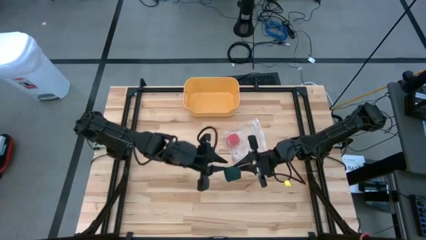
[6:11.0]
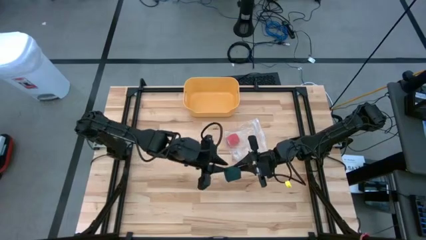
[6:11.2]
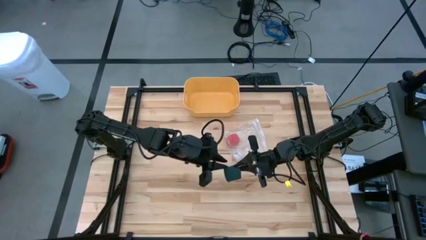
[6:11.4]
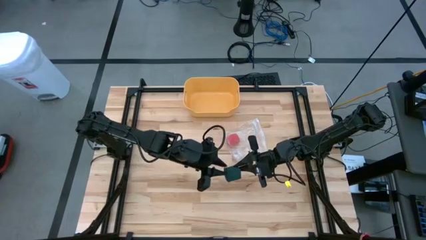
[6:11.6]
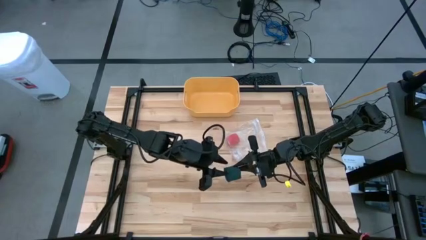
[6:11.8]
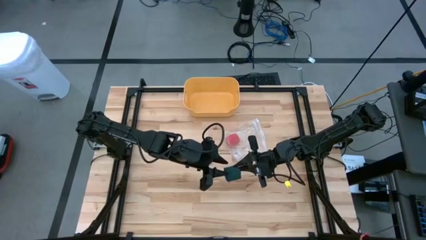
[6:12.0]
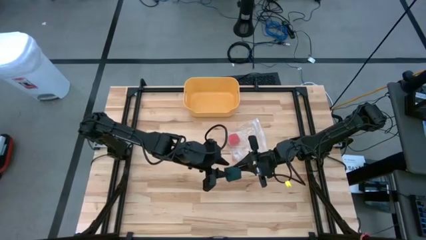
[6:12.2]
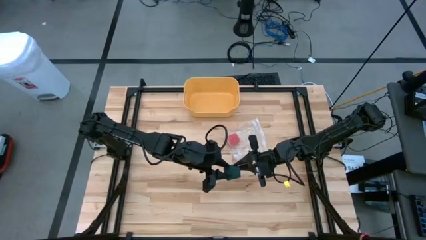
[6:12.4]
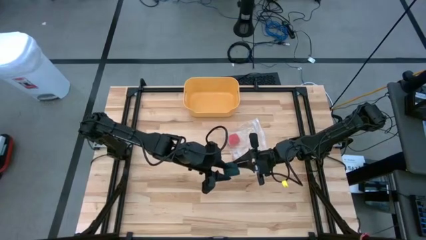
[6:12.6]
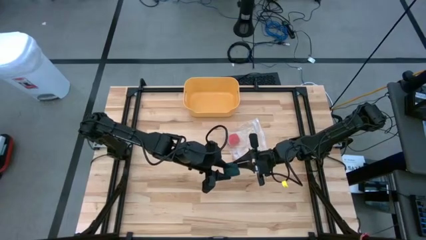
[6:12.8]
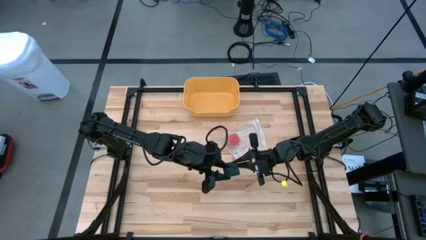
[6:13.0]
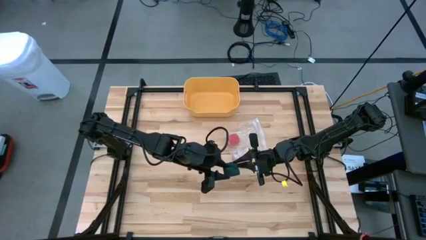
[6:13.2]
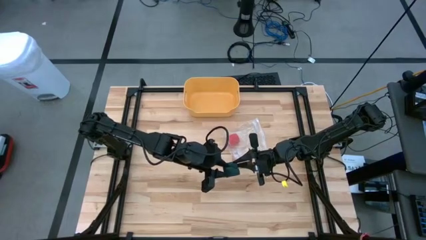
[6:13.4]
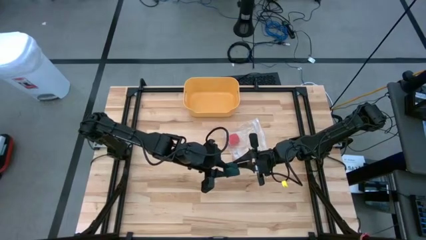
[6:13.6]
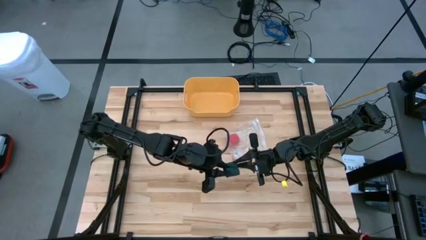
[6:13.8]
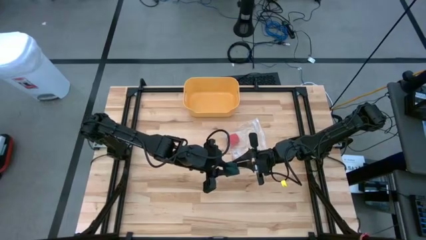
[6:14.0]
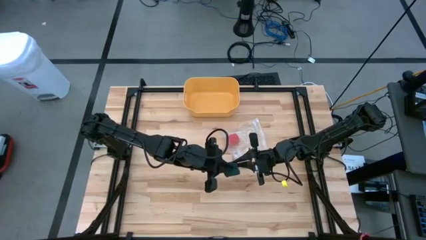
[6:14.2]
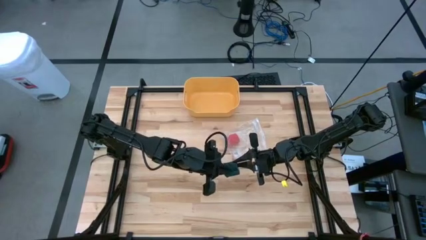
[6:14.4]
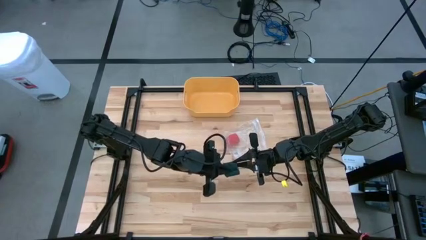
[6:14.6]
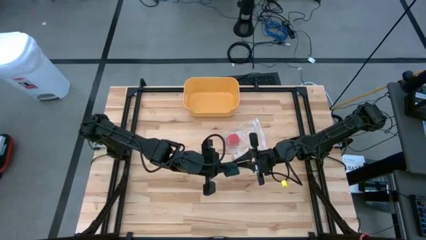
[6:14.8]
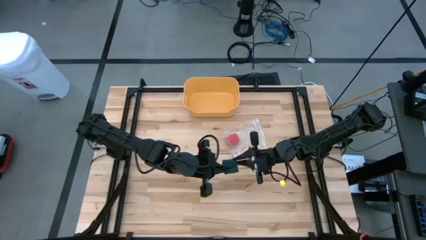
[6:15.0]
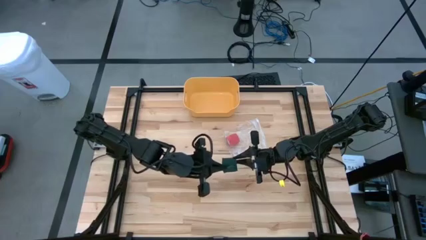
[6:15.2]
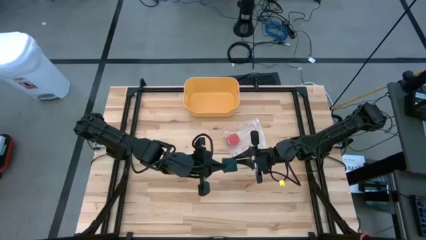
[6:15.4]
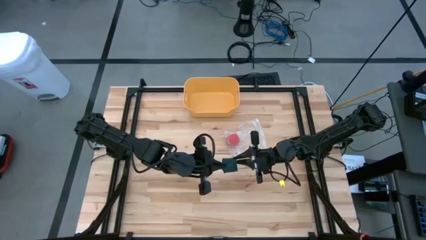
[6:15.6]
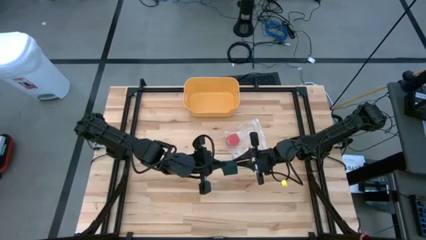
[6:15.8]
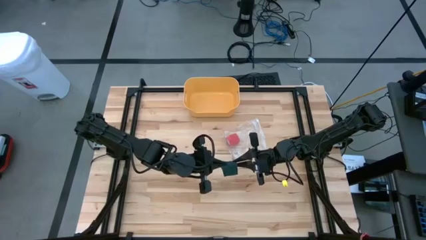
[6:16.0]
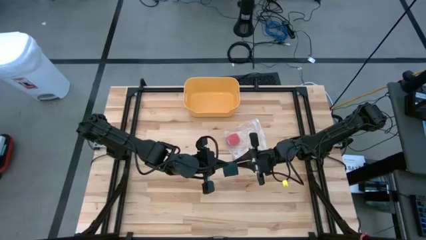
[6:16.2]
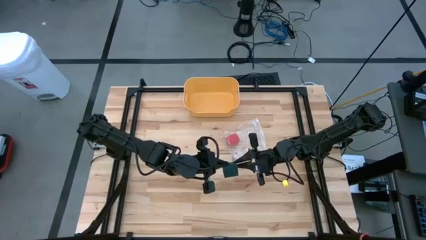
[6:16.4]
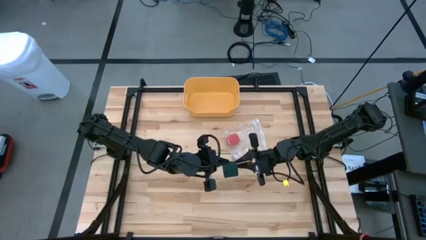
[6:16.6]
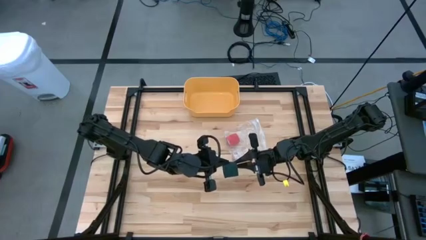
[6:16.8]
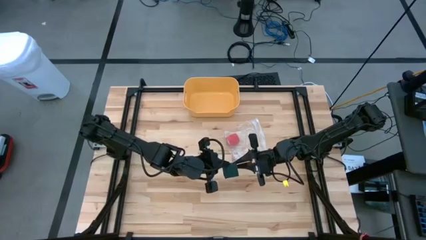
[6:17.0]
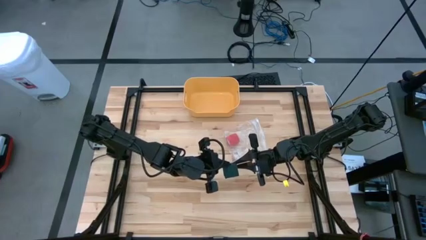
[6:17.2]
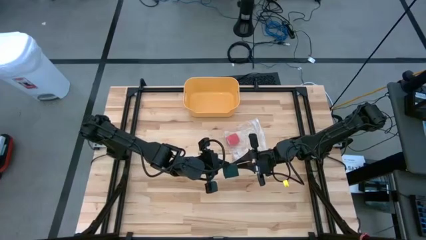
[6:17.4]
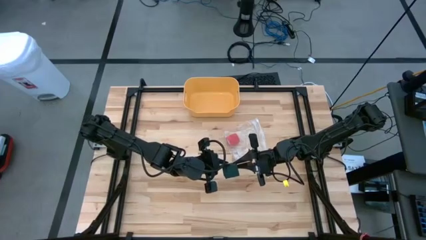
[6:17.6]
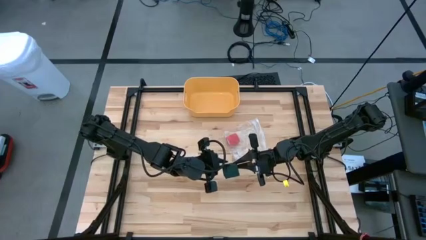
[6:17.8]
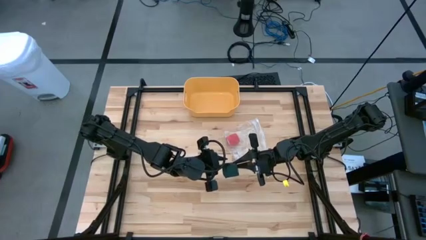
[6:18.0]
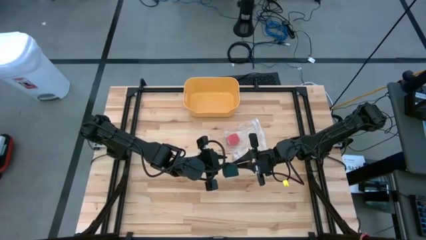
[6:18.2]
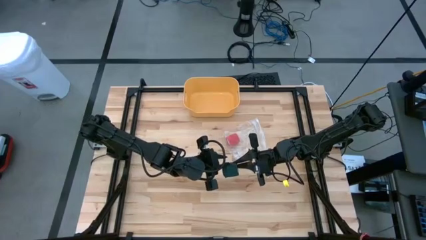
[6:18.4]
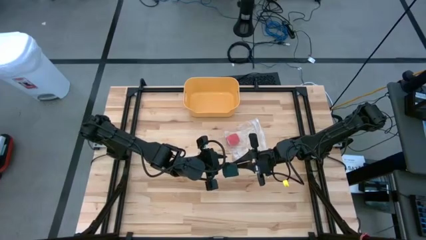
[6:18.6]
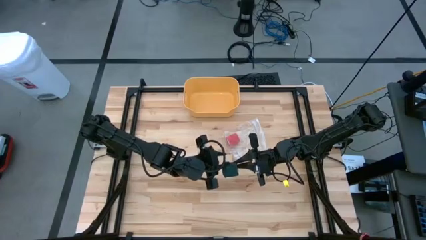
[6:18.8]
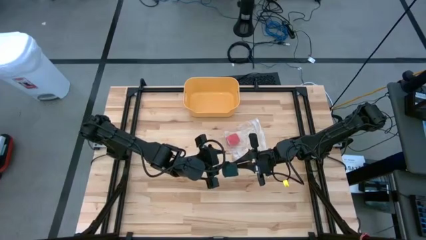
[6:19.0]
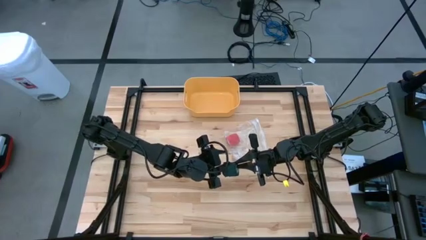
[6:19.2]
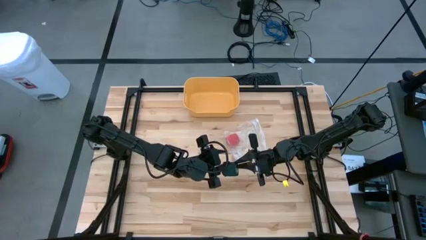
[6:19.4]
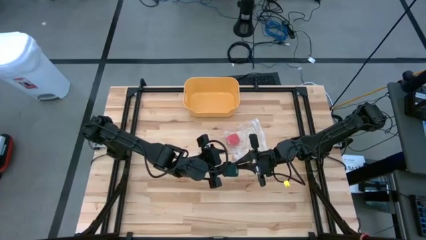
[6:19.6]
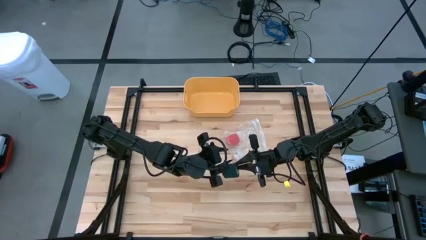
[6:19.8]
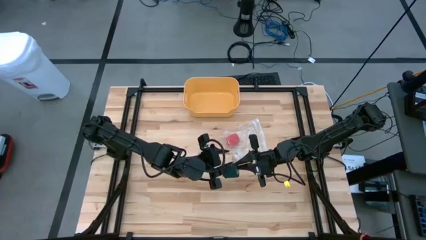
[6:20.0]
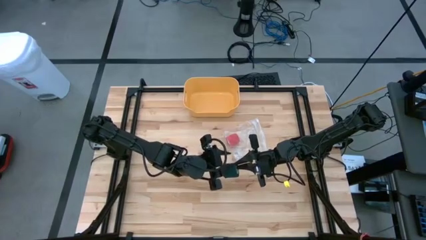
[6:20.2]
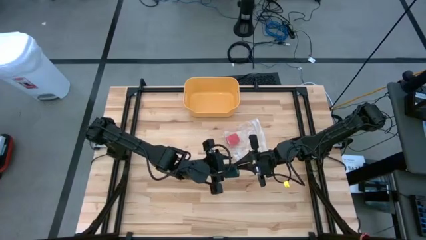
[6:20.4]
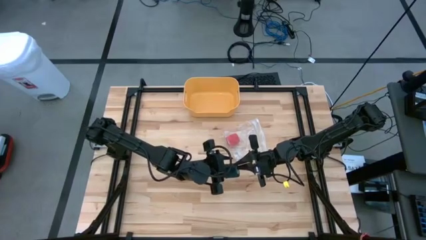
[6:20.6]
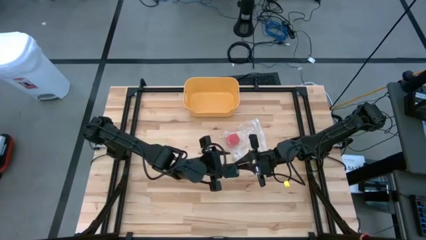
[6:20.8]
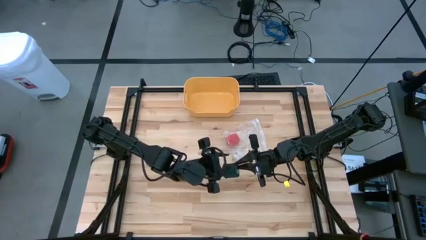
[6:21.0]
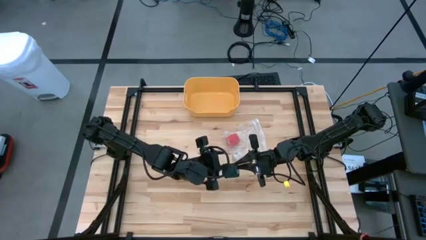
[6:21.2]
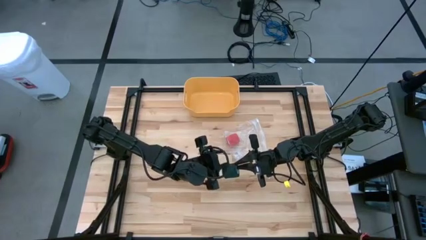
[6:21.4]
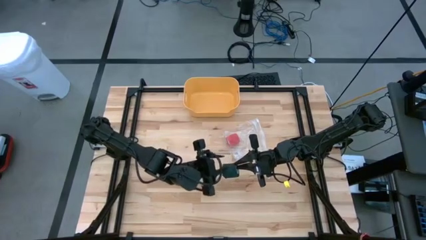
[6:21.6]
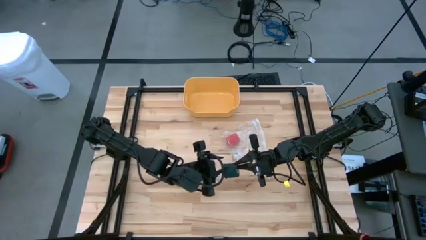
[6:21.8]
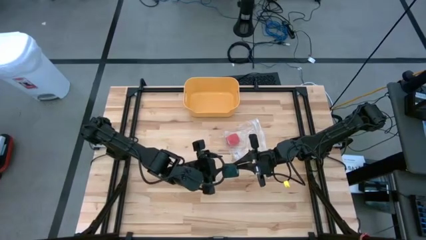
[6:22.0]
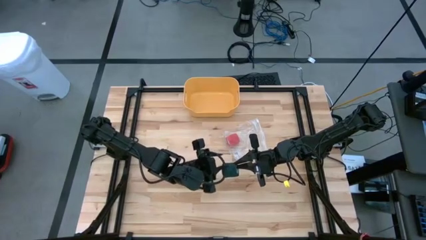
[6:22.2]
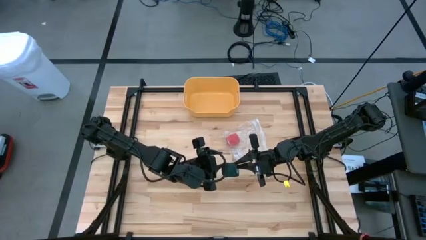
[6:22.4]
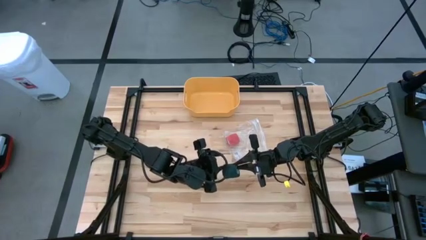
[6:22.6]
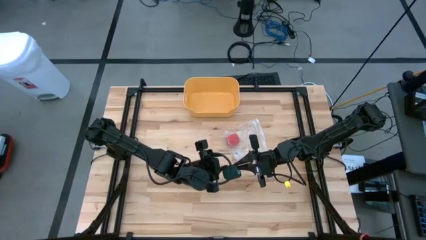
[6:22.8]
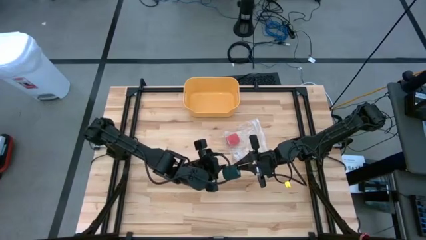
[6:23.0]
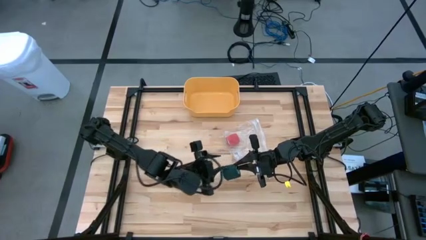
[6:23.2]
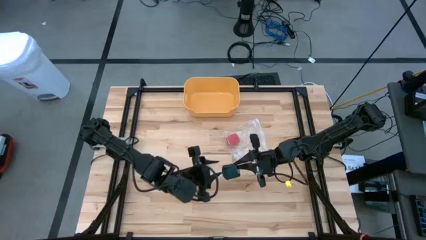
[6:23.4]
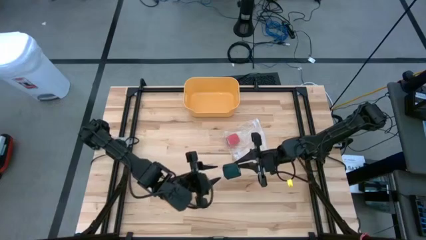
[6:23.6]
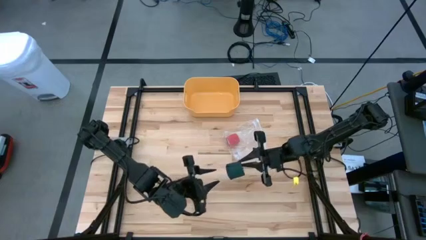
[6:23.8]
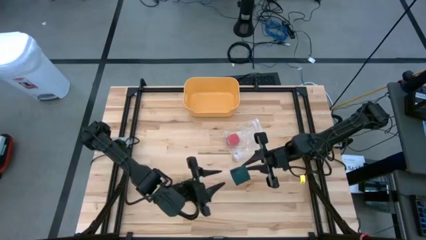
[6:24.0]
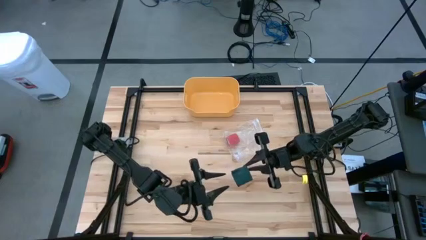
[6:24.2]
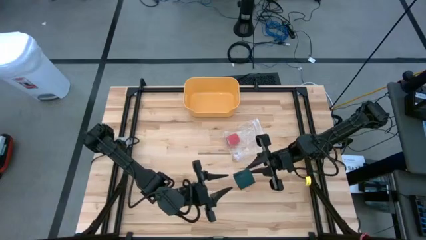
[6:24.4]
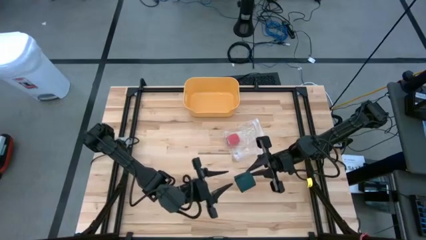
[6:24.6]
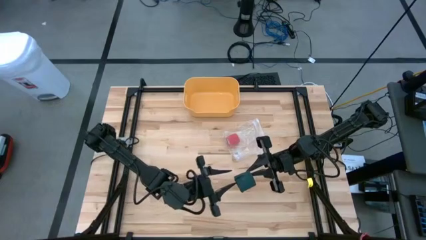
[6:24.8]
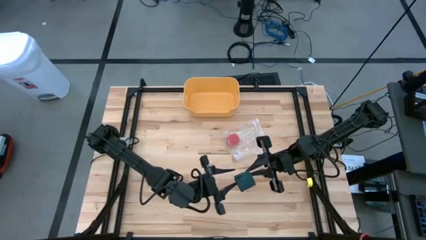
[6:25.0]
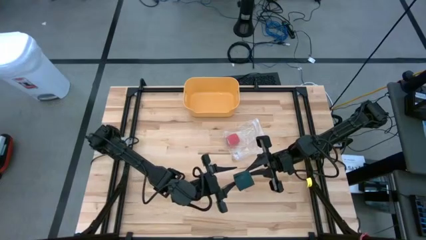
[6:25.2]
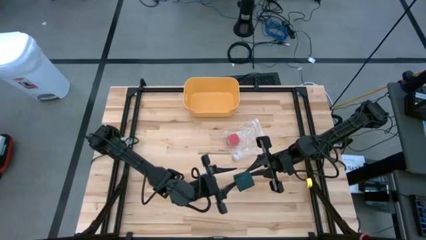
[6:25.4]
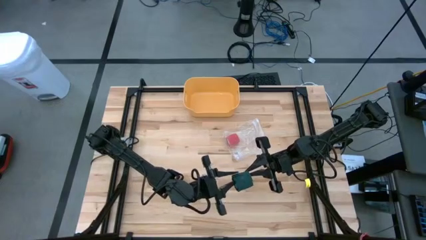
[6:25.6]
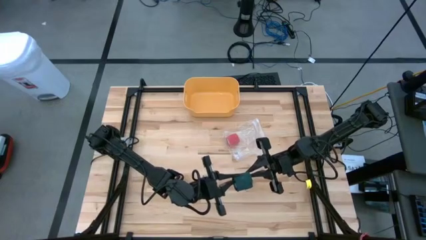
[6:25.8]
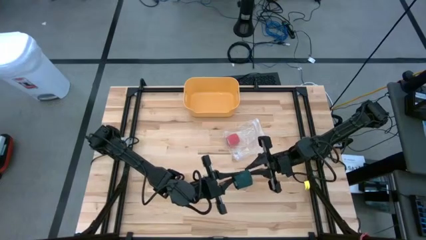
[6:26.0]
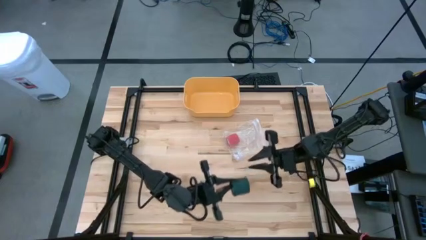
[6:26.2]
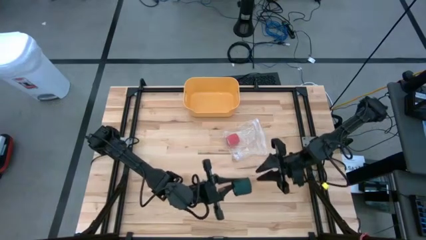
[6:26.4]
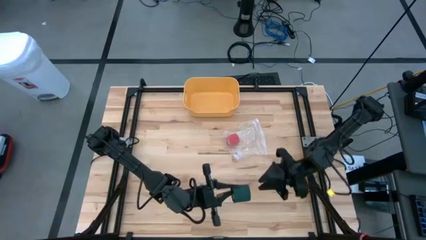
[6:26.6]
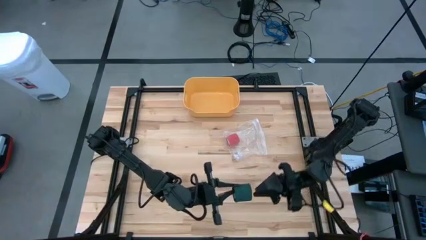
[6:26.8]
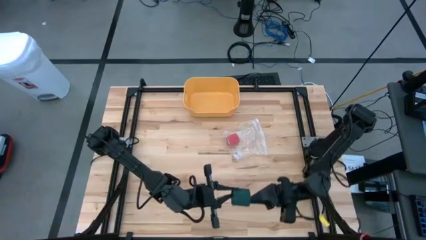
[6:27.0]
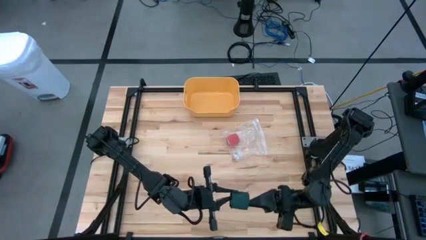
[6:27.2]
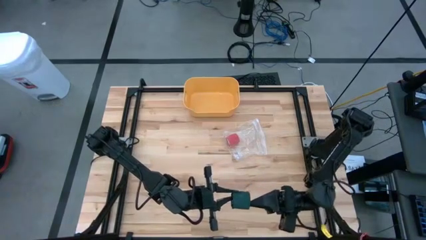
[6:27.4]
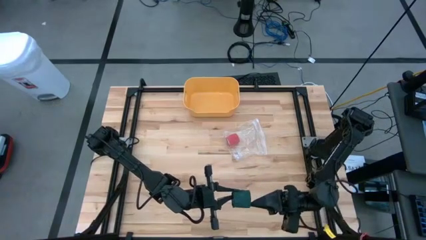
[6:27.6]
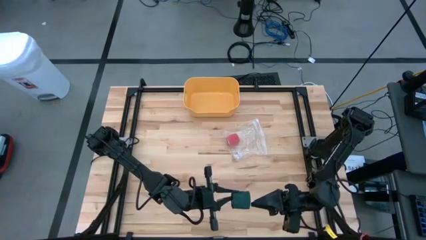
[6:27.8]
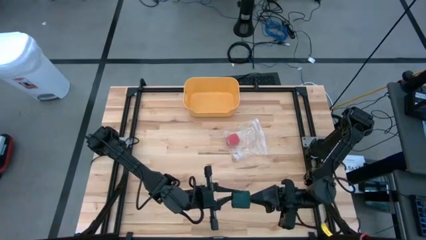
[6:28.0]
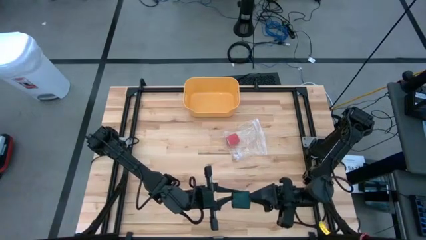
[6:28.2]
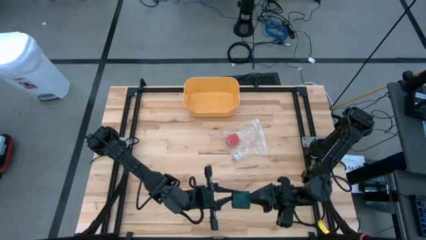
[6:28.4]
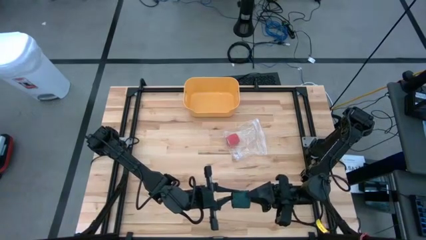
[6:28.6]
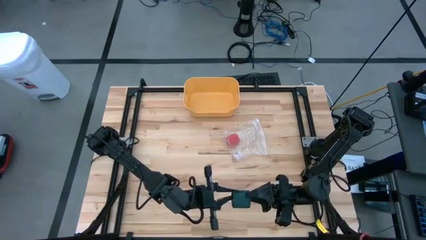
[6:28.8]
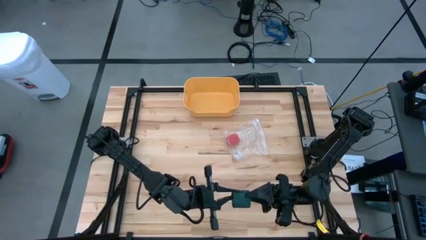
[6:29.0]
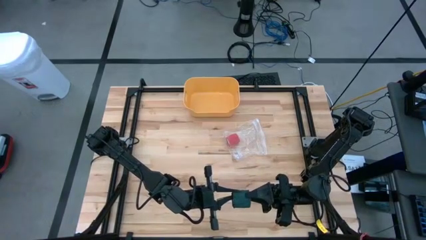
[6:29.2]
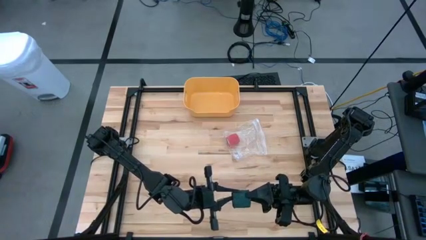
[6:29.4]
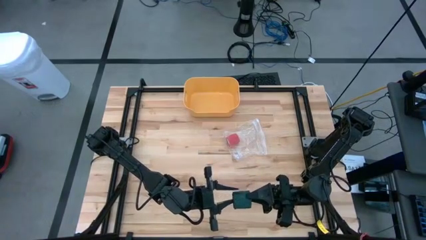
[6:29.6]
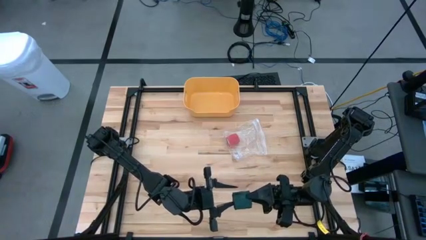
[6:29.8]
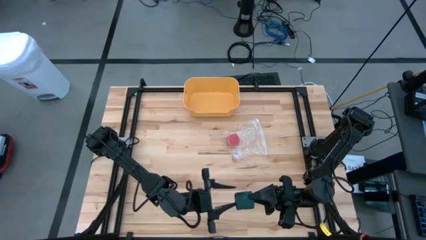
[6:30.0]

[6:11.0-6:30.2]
Task: Roll bandage
Roll the green bandage
